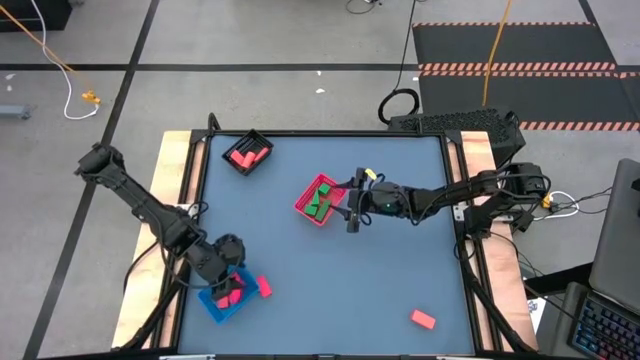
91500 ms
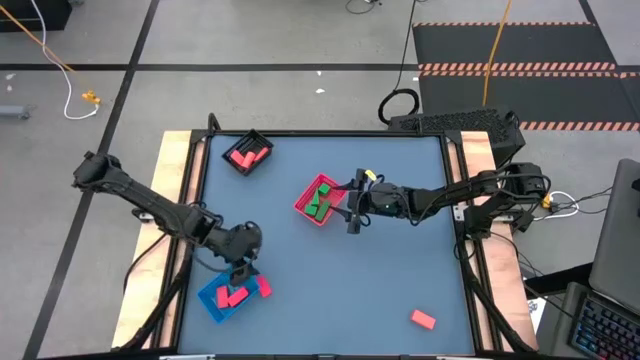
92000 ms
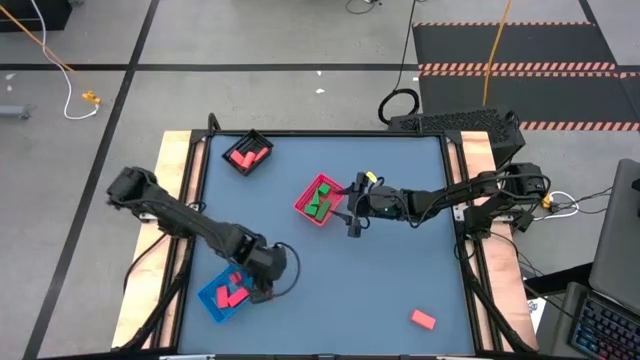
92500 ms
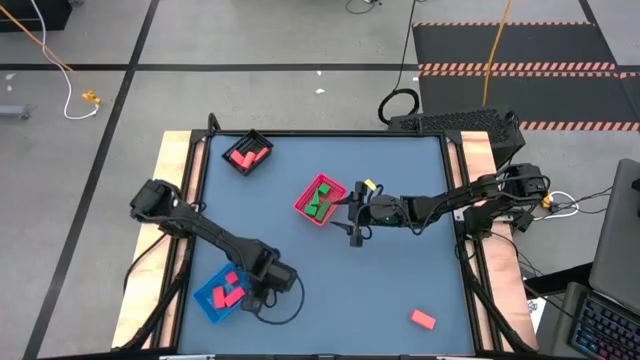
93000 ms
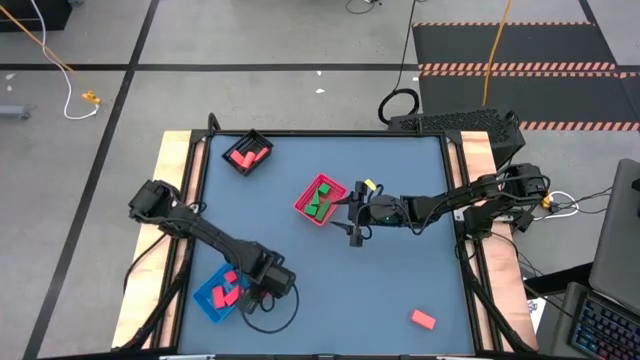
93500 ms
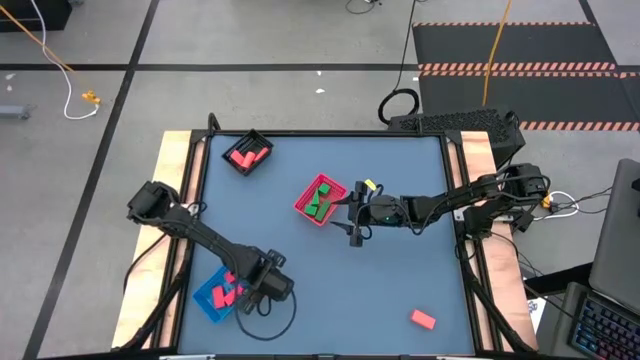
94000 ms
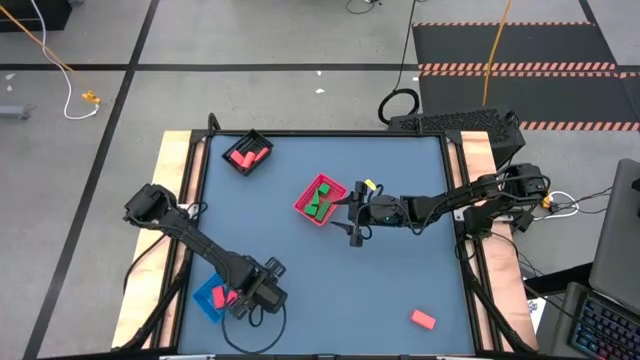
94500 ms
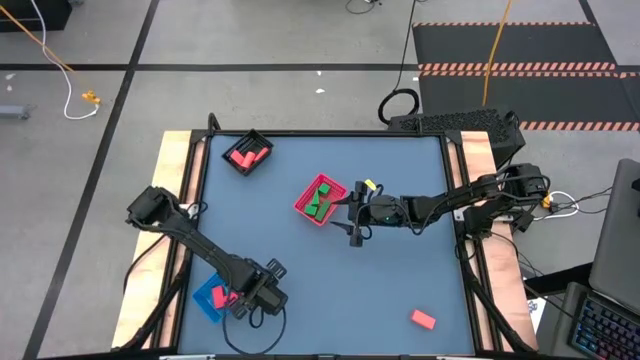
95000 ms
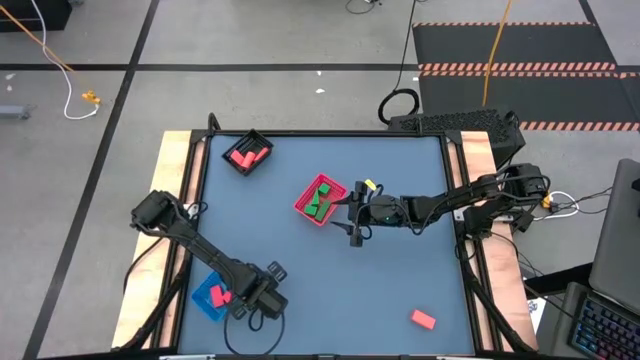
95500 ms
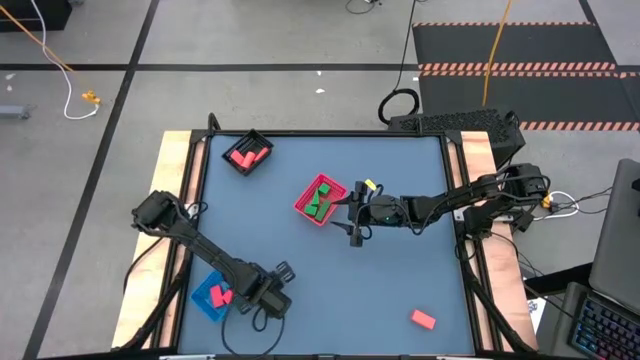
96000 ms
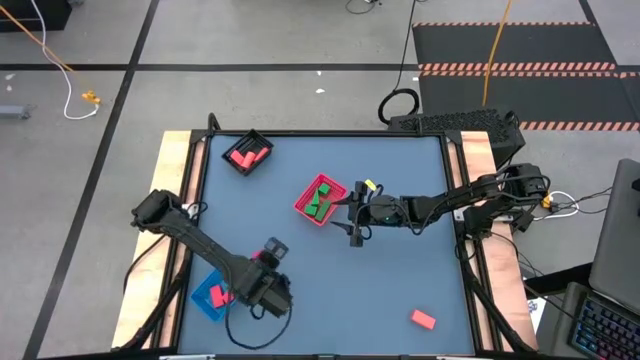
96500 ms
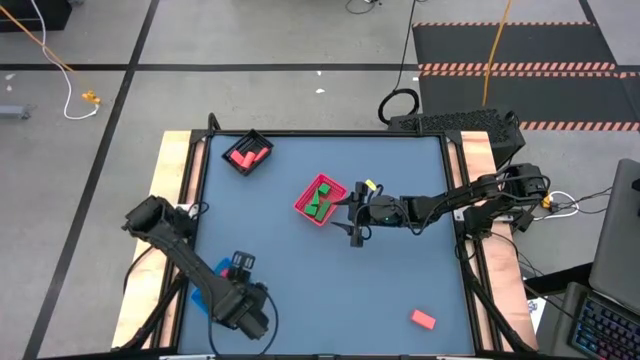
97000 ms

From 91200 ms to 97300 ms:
Task: Sort & place blocks by color
Put the red block into the blue bin

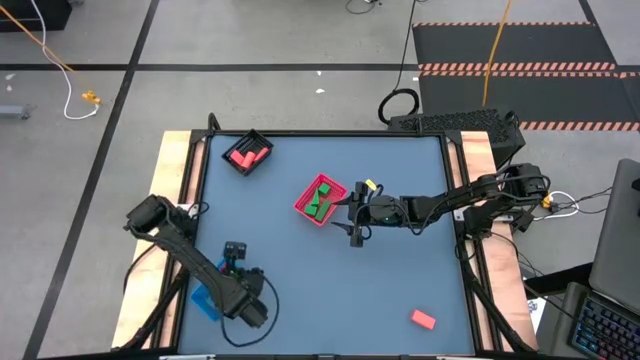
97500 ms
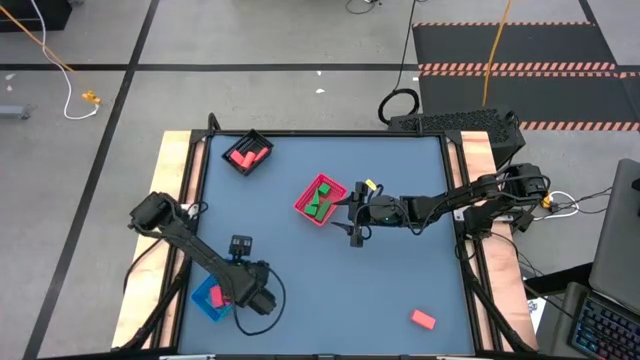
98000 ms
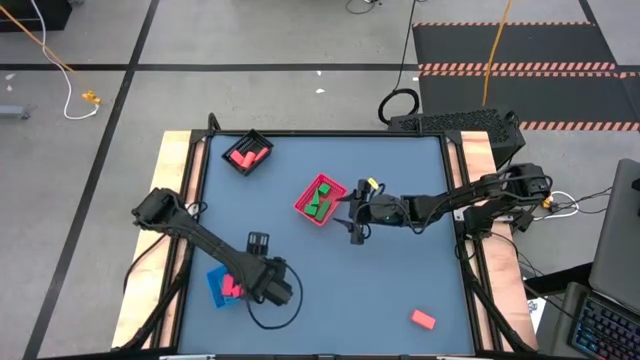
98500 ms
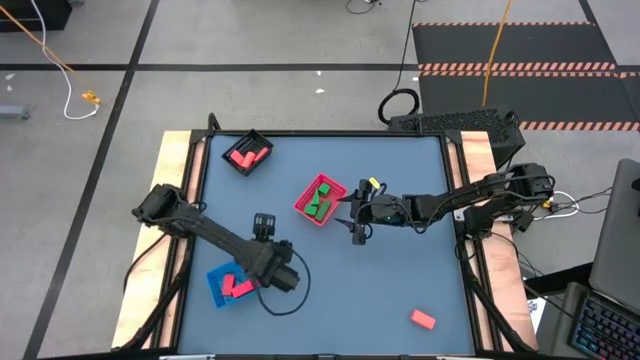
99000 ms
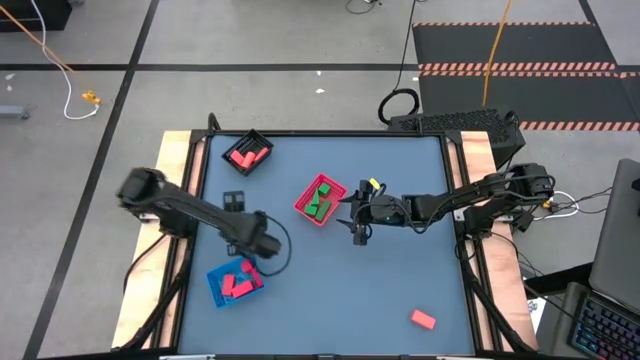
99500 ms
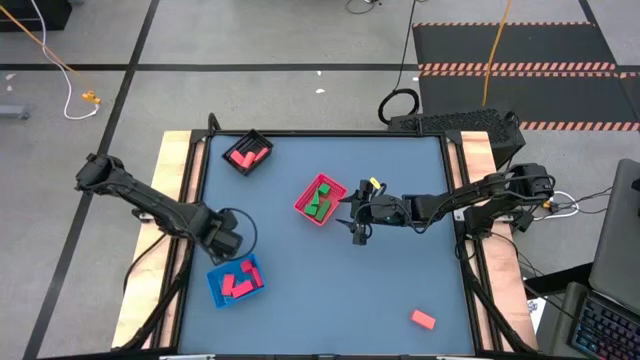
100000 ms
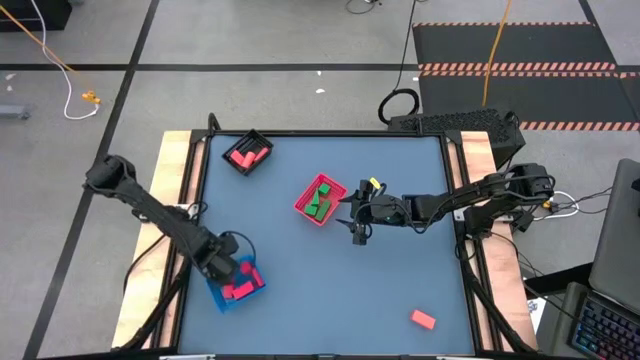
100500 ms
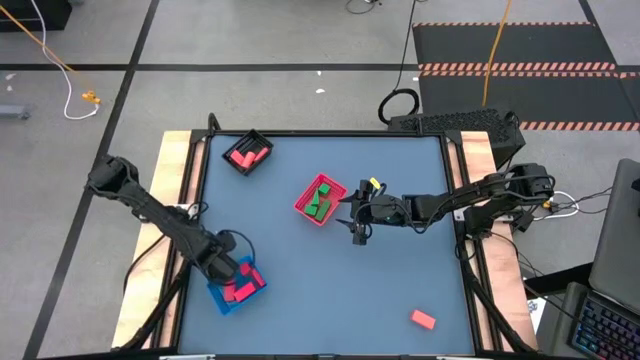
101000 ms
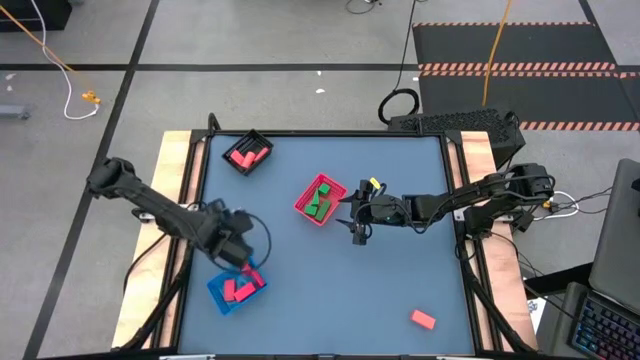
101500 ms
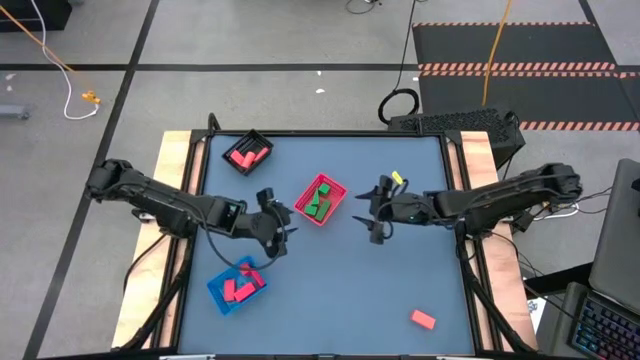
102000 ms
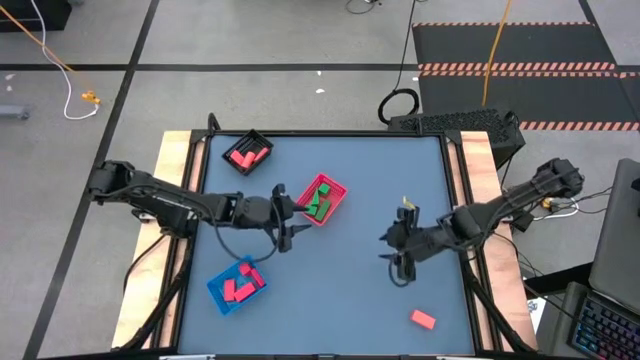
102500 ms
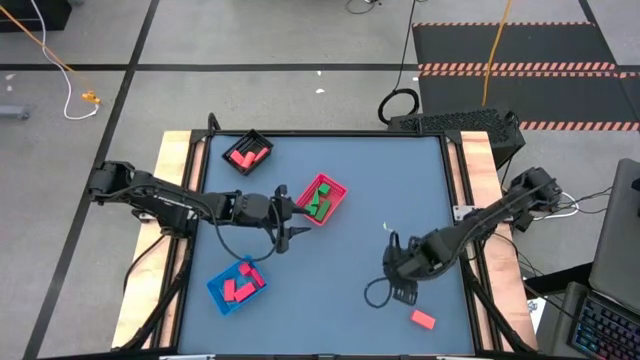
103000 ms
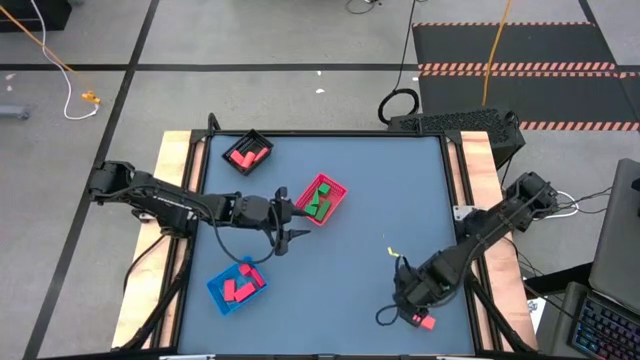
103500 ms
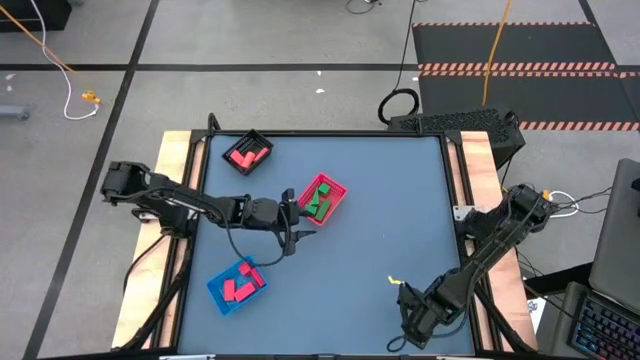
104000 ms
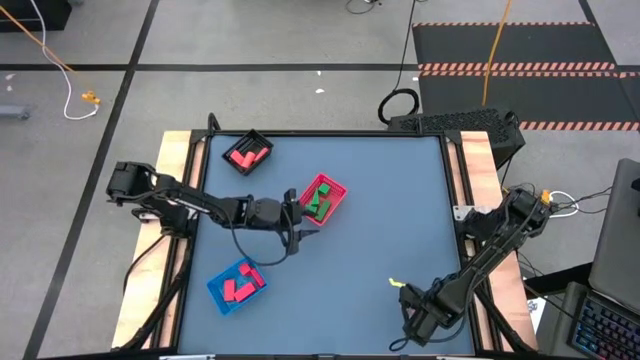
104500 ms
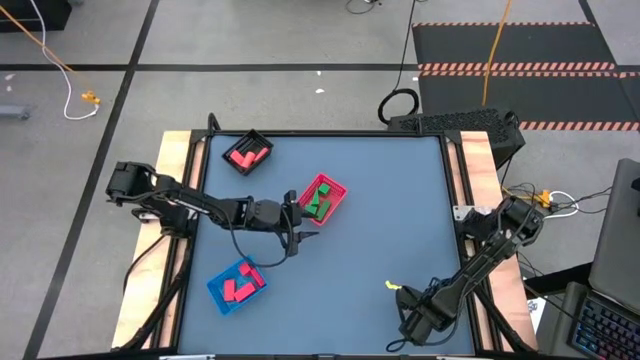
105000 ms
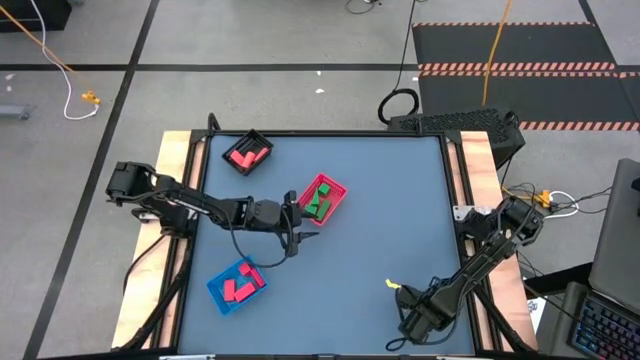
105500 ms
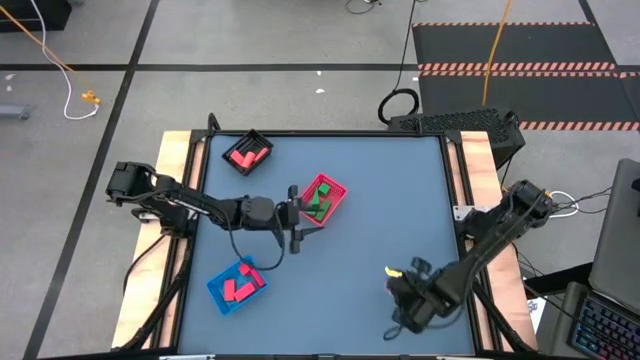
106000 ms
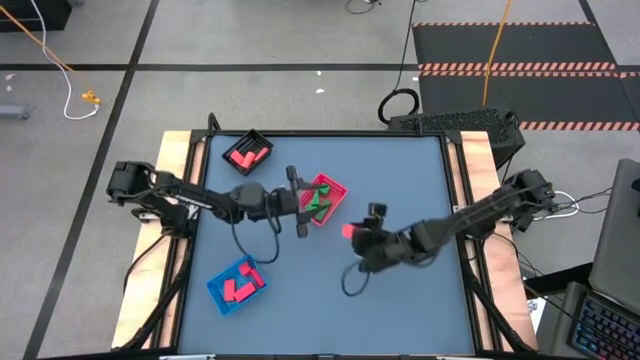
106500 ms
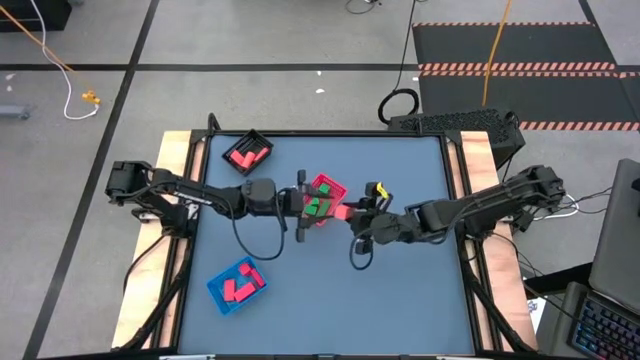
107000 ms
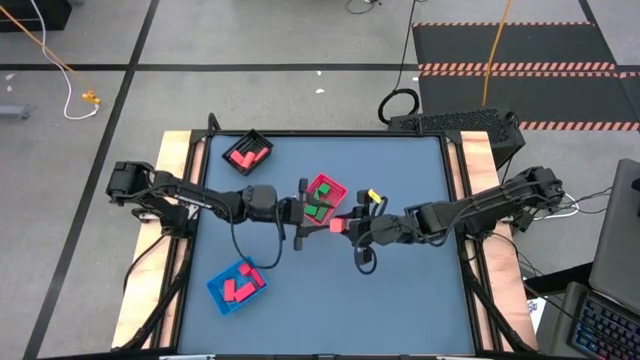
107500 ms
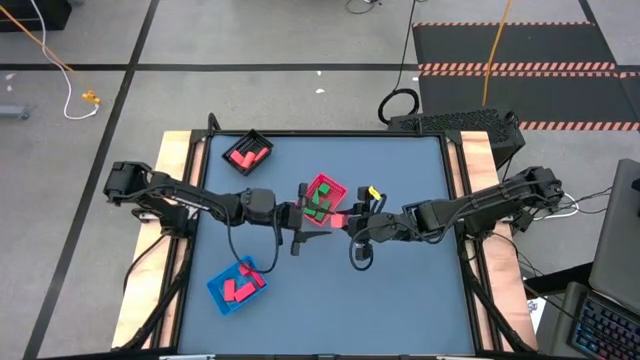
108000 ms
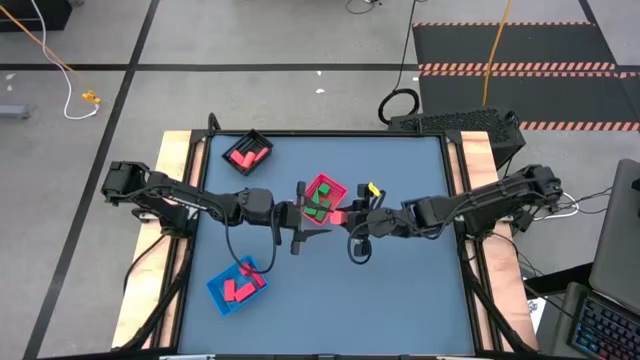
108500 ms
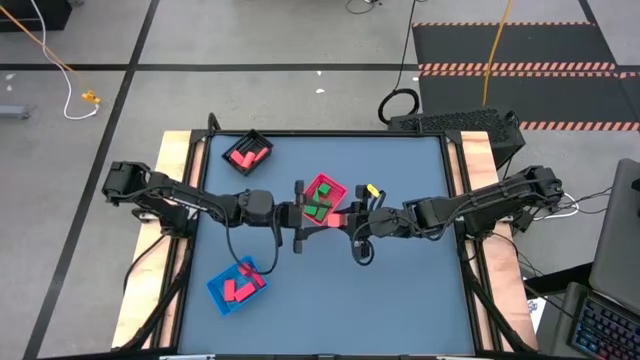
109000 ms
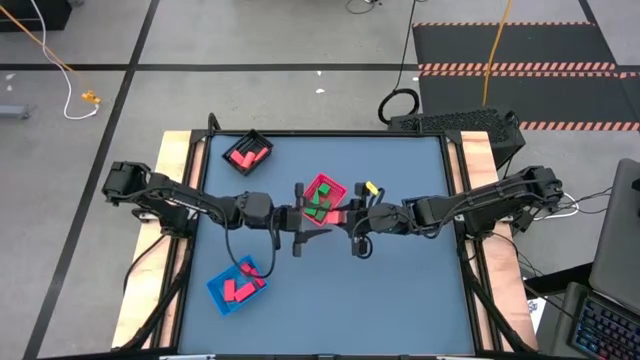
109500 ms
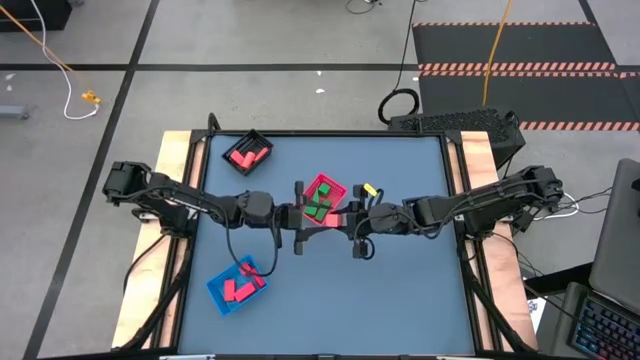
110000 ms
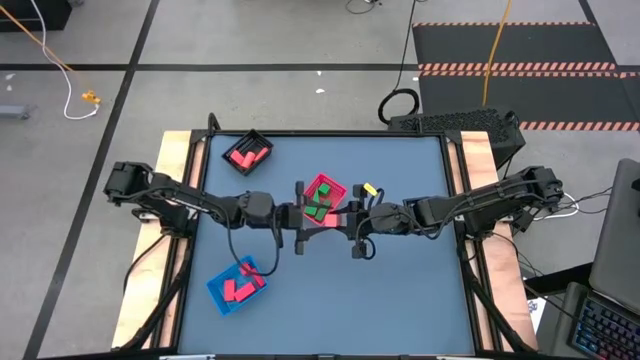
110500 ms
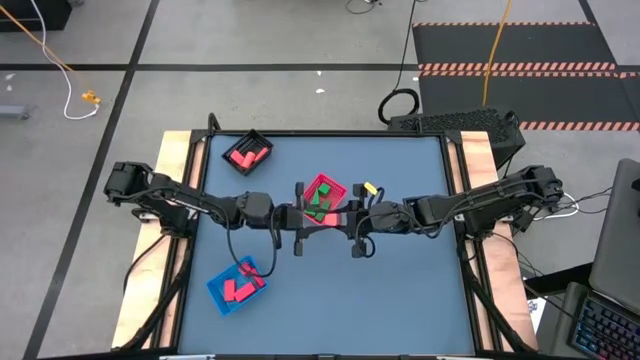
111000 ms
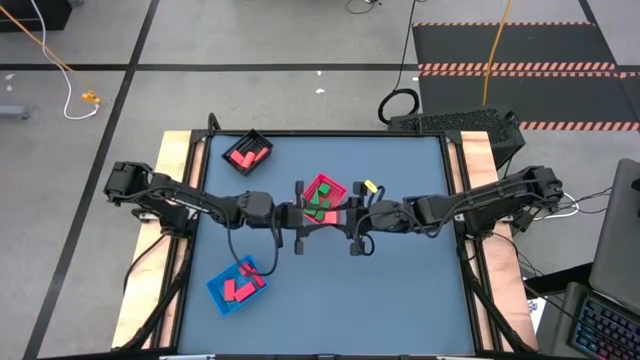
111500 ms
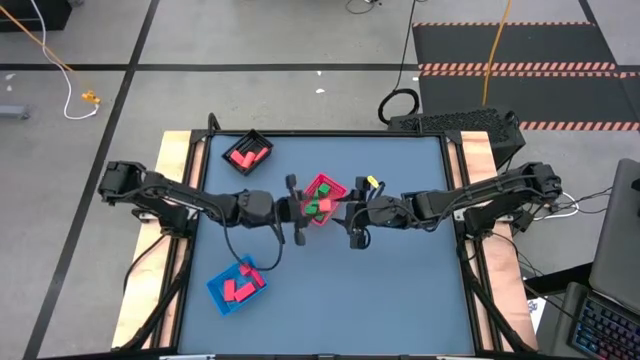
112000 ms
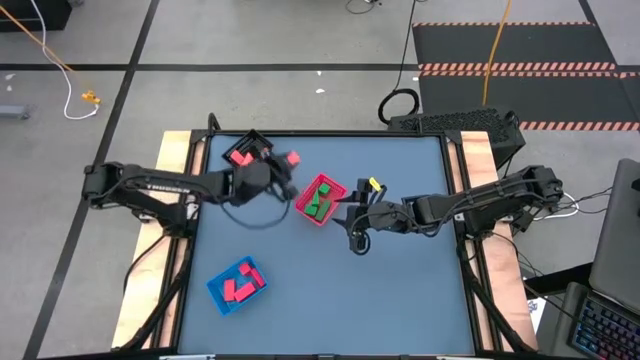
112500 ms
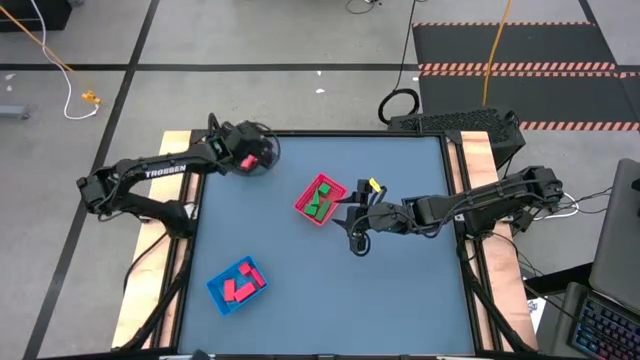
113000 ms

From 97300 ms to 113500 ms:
Put the orange block into the black bin
